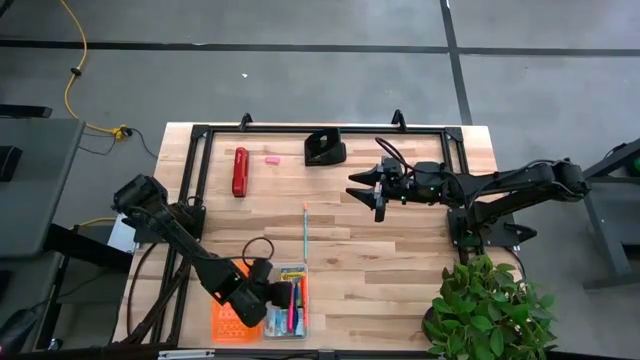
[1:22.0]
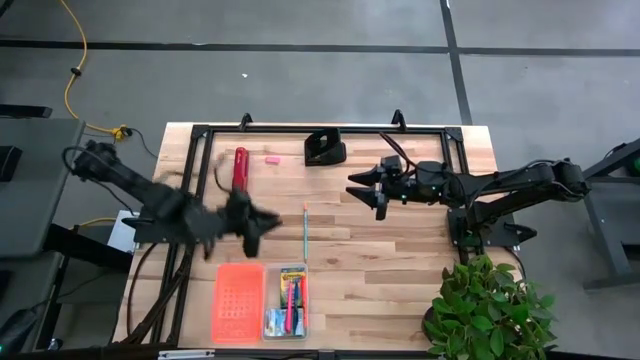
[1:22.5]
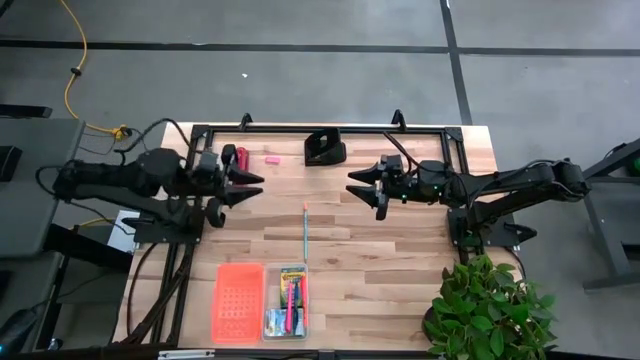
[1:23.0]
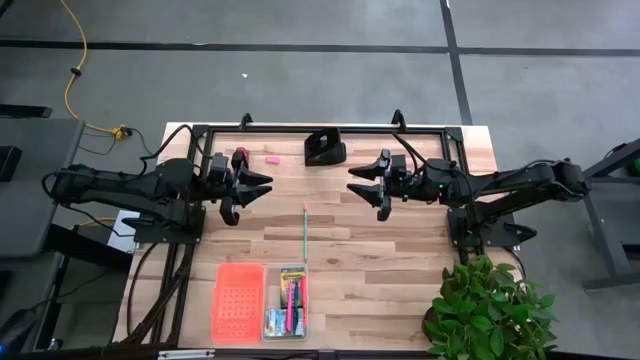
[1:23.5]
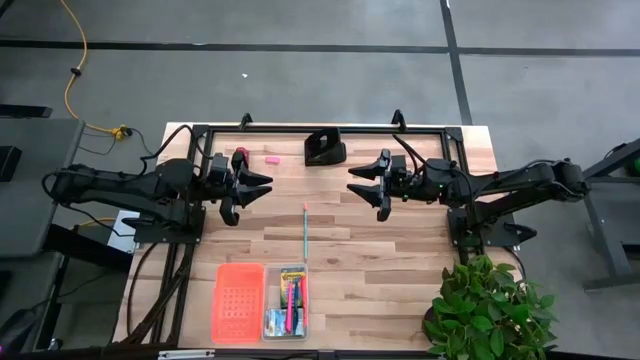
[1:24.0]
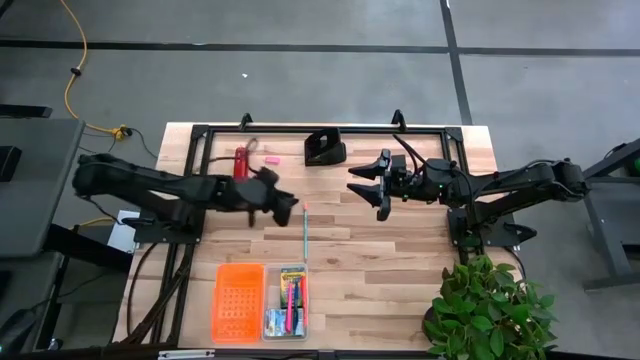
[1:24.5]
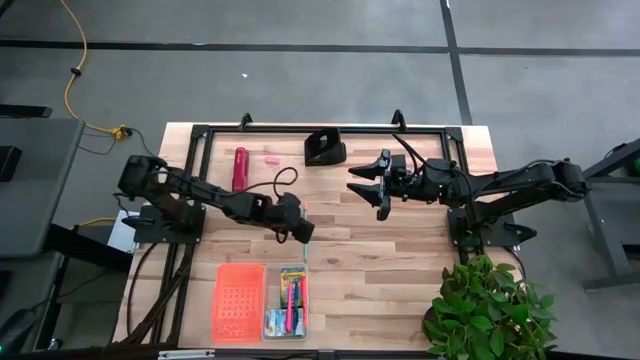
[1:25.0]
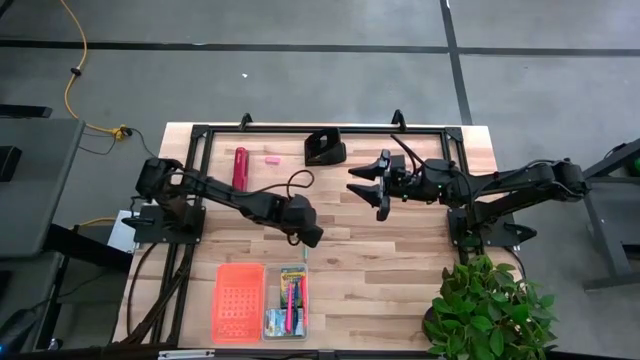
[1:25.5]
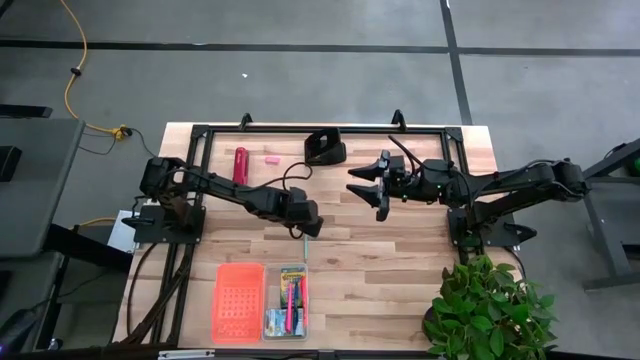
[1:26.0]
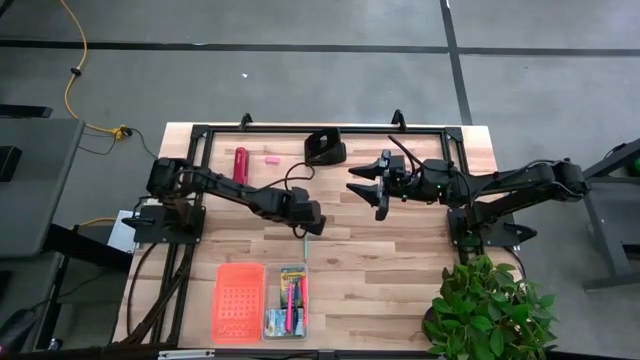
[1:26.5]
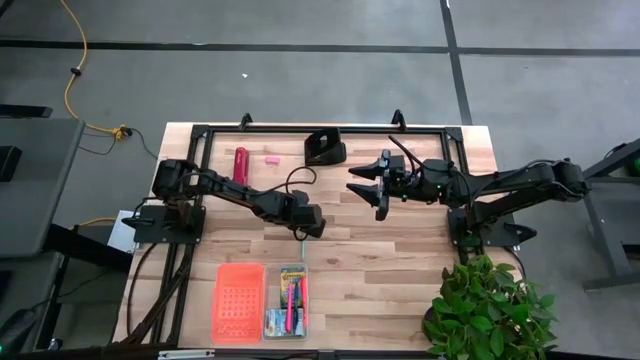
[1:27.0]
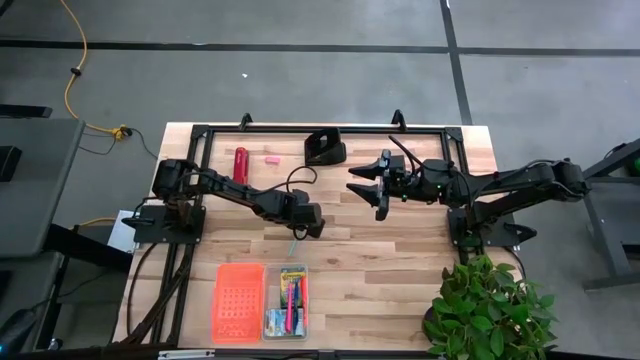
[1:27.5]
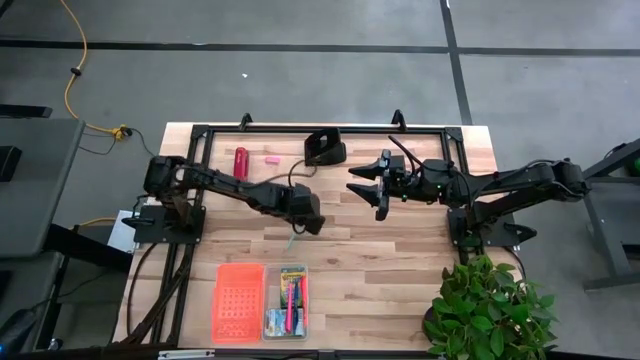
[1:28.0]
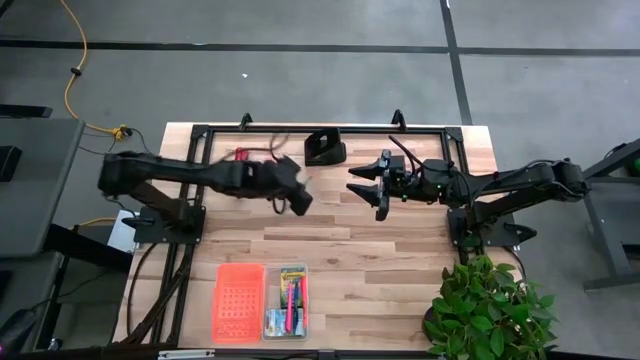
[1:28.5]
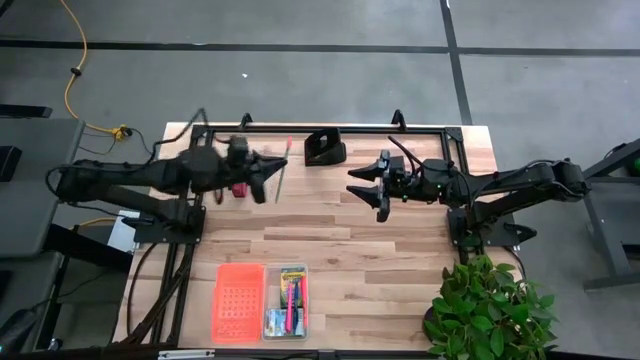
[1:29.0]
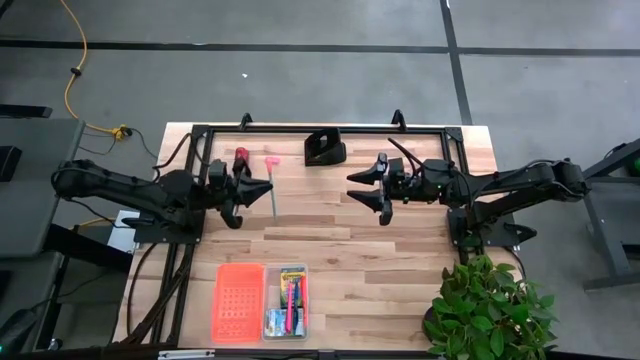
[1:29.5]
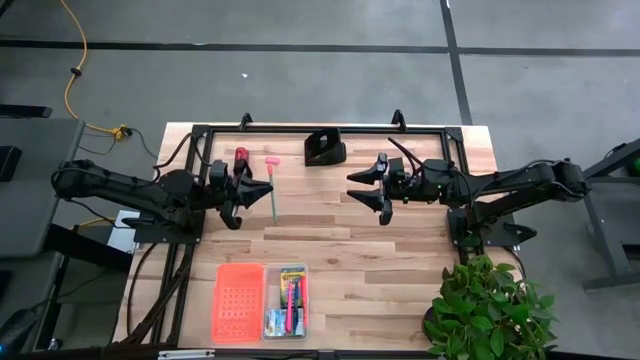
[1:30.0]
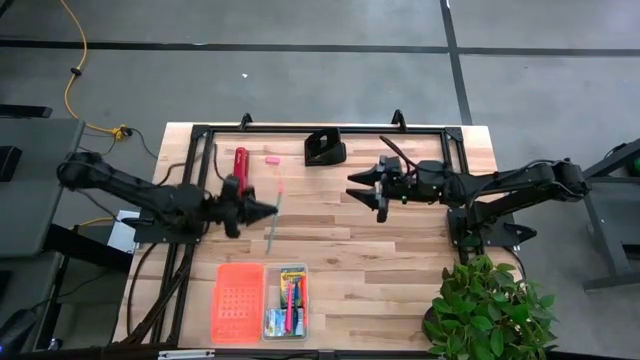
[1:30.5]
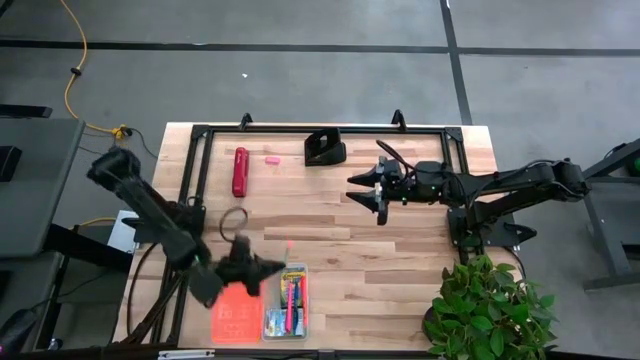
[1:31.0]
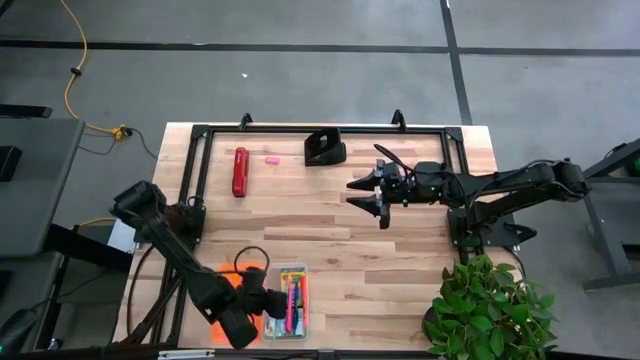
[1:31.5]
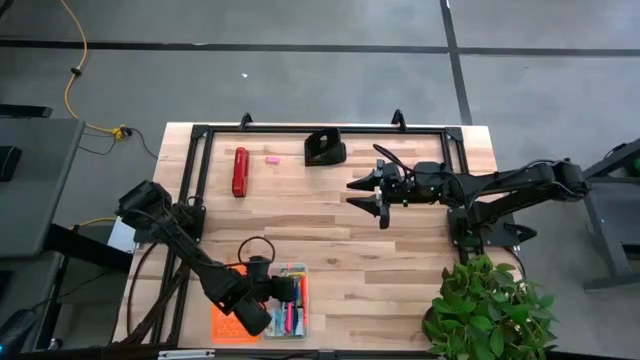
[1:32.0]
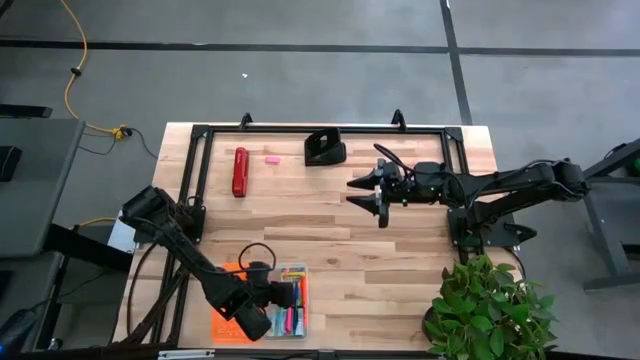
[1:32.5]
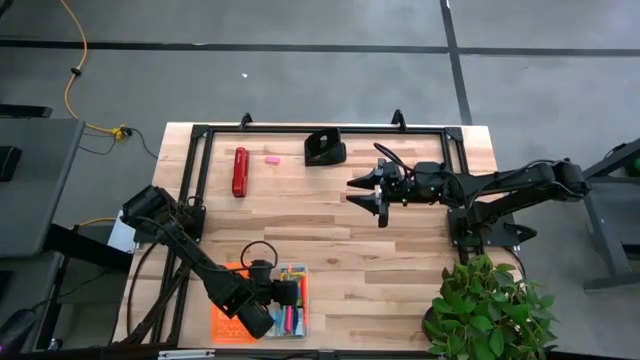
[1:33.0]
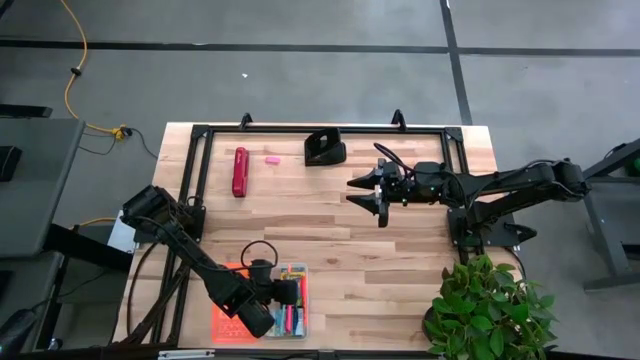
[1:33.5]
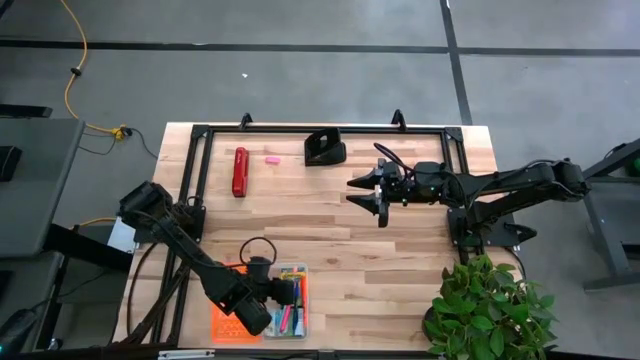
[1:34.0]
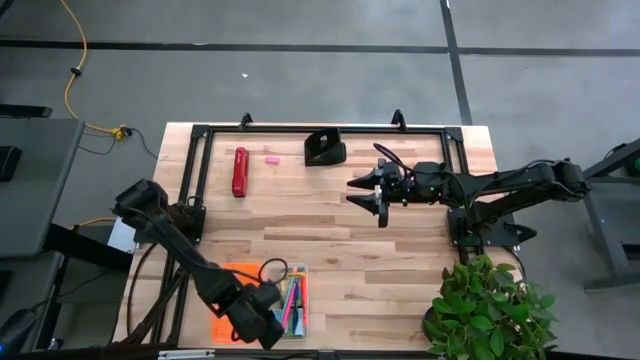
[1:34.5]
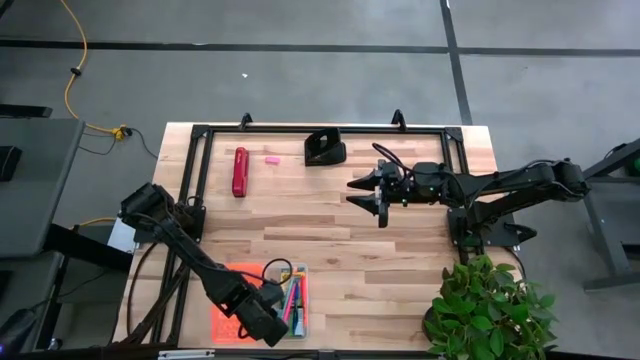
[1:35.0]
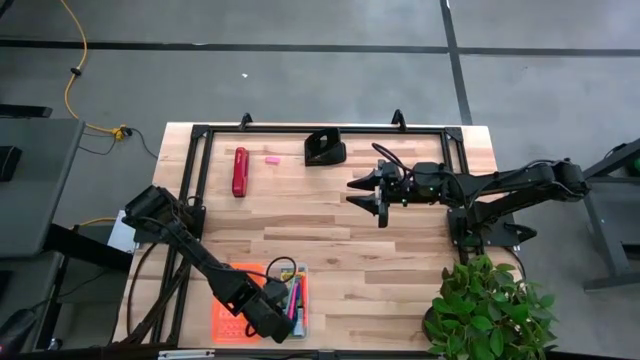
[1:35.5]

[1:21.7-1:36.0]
Task: Pack school essentials
Put the light blue pencil into the supply box

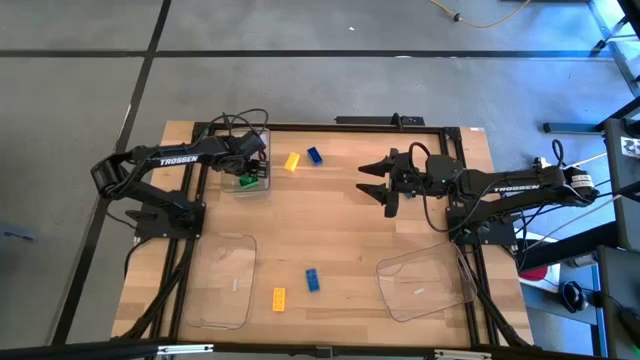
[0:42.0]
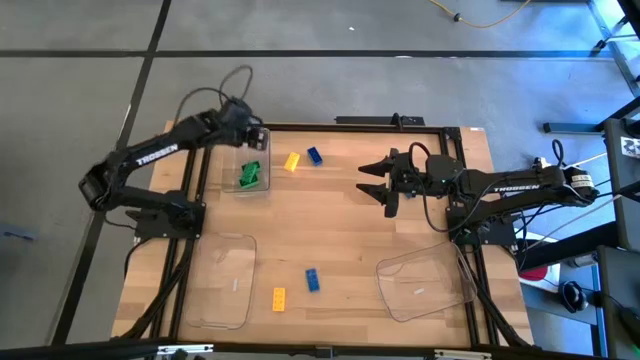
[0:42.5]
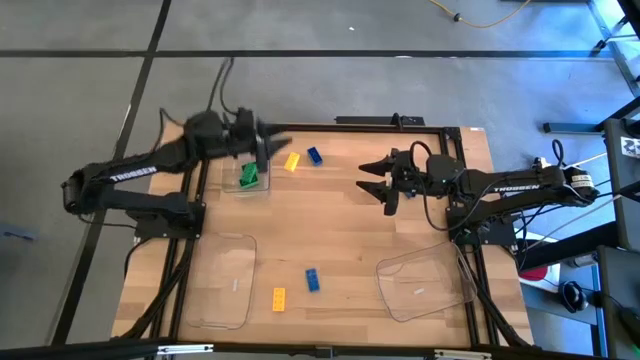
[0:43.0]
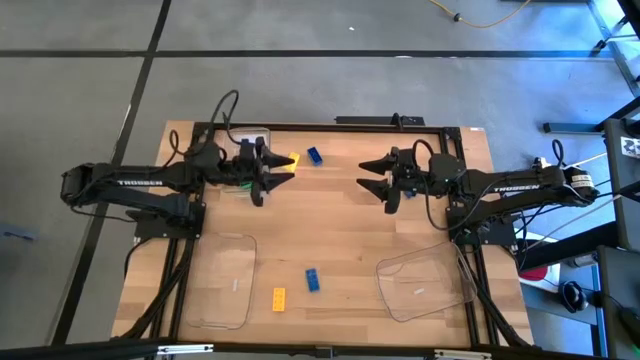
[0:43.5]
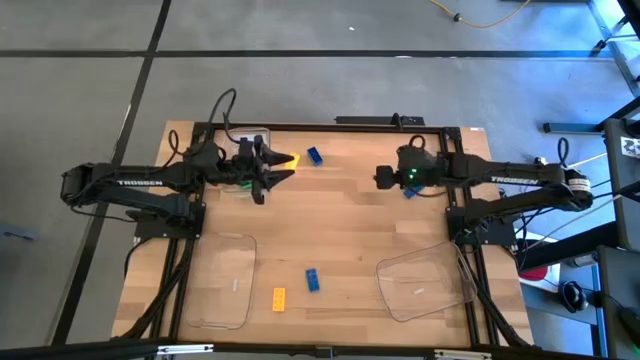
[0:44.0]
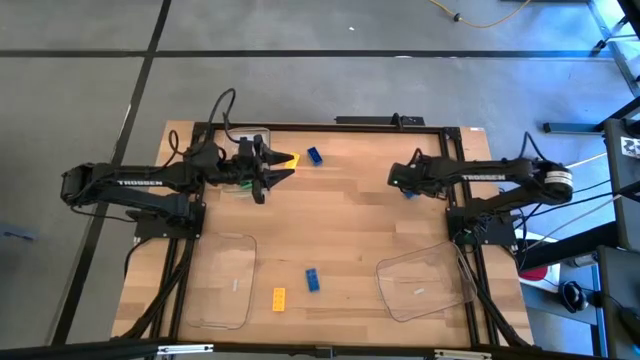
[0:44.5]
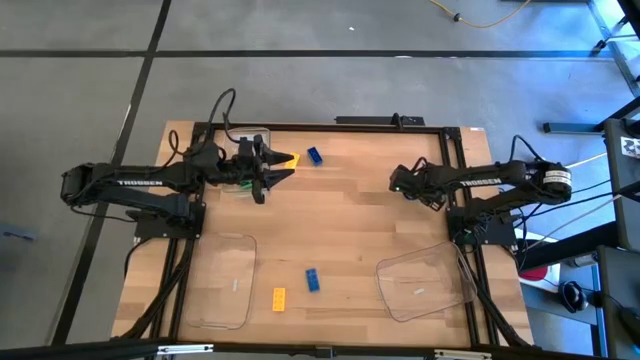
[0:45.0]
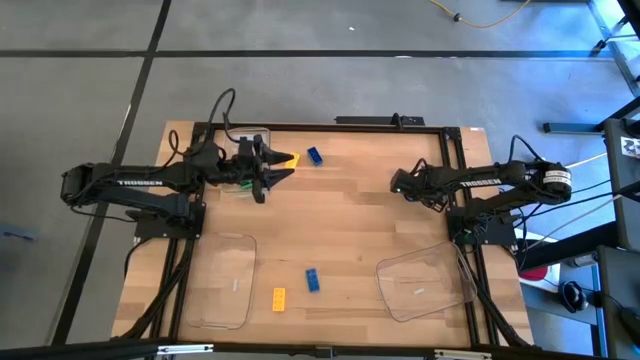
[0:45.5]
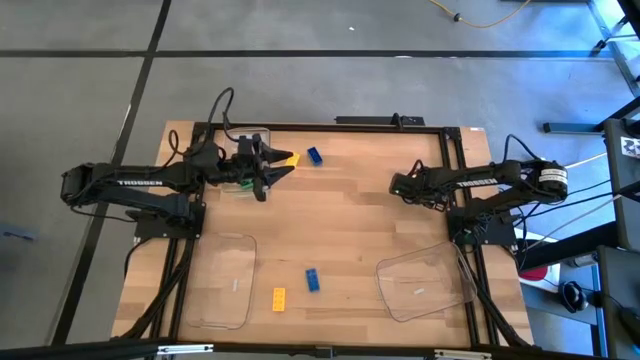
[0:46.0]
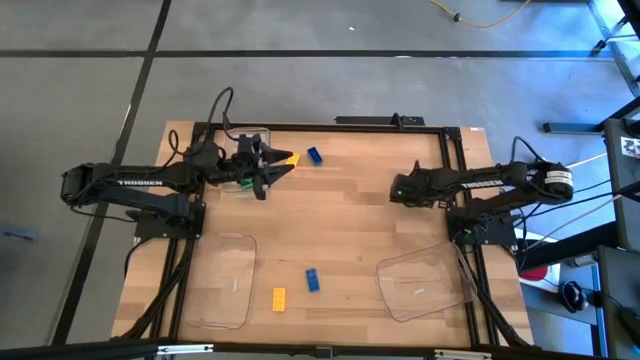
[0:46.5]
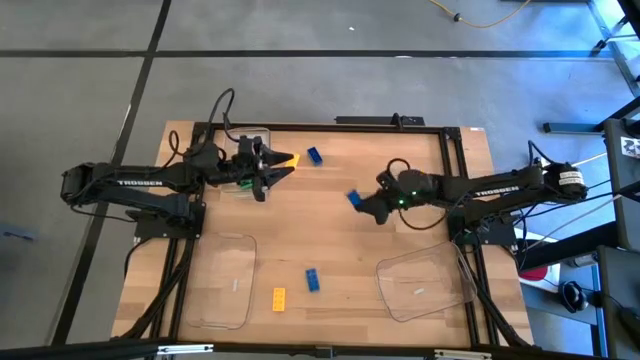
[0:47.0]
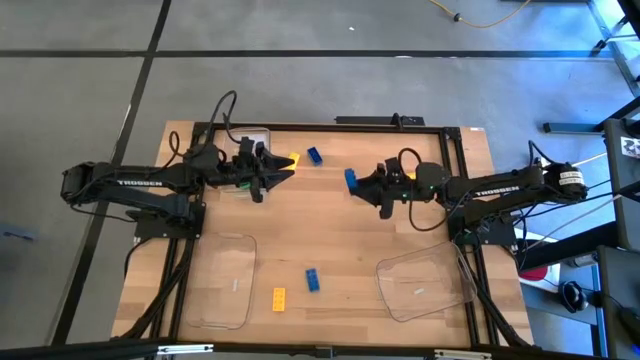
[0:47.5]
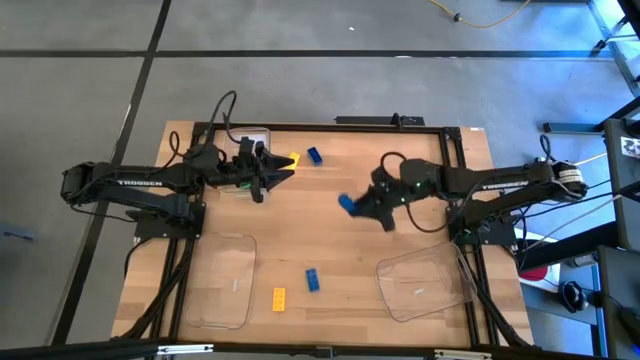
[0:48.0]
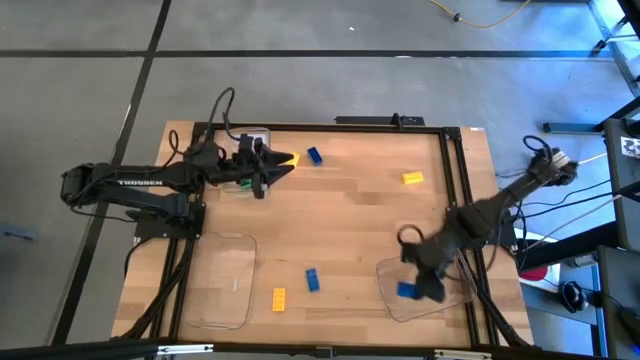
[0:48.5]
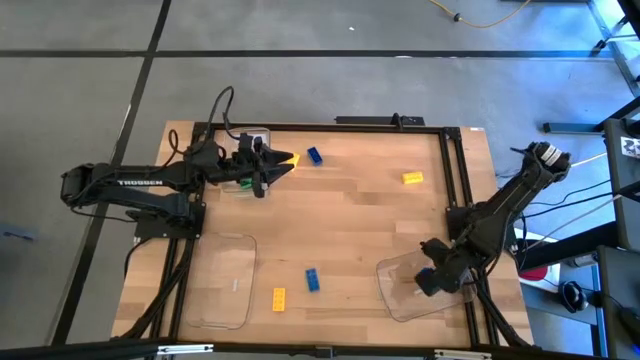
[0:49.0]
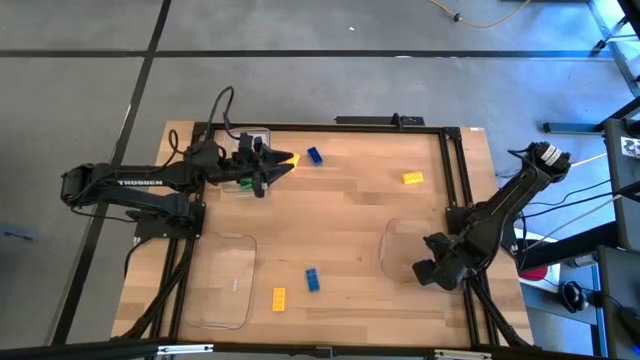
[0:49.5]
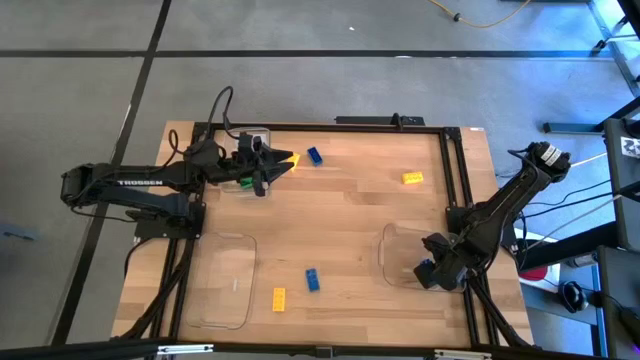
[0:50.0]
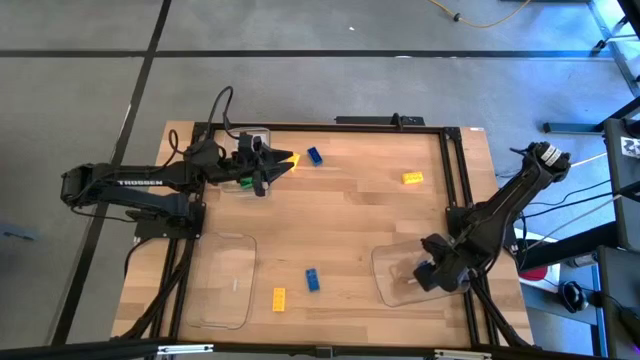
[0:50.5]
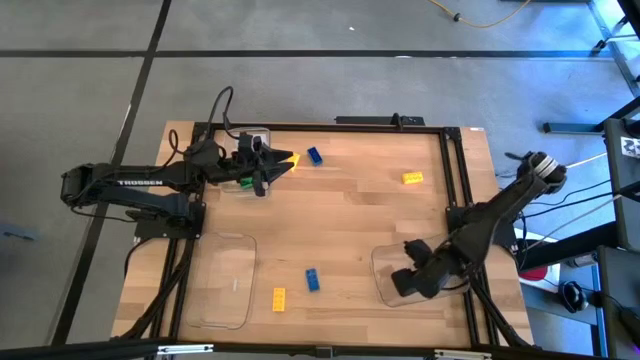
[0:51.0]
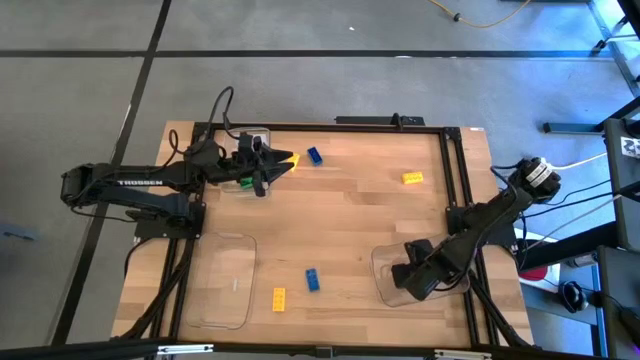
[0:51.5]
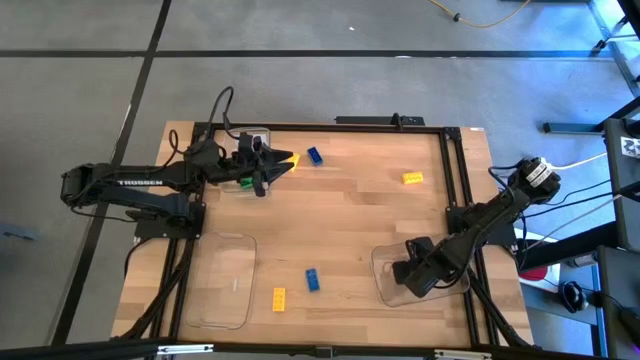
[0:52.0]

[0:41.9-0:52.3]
Task: Sort & place blocks by color
Put the top right blue game piece into the bottom right transparent bin
